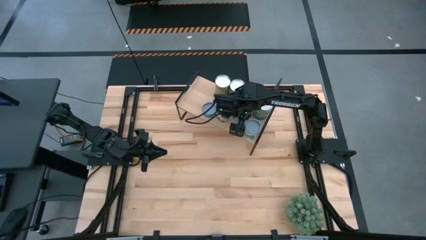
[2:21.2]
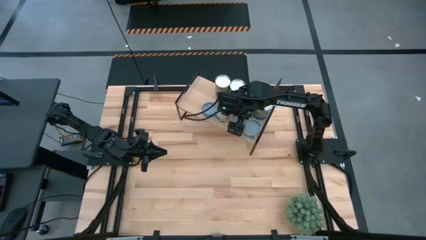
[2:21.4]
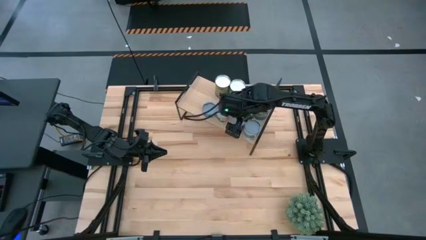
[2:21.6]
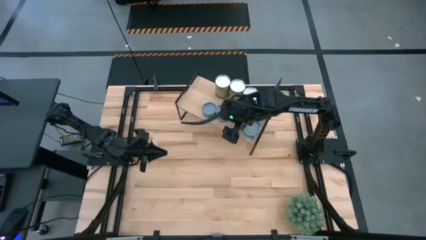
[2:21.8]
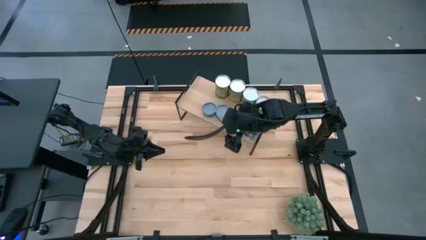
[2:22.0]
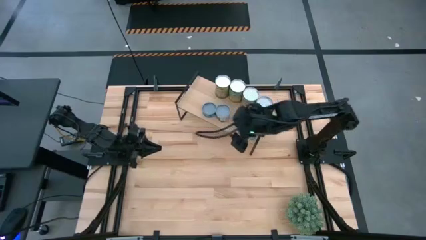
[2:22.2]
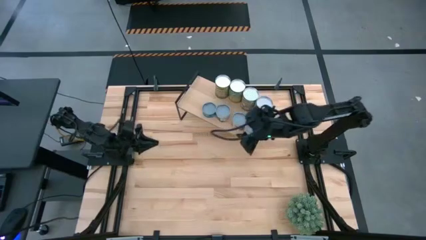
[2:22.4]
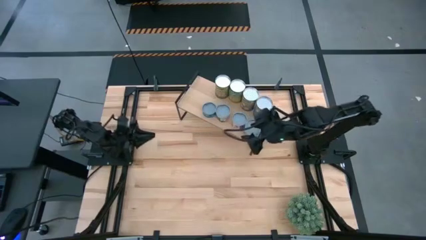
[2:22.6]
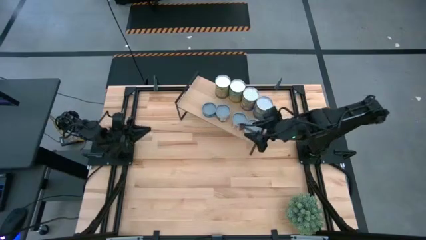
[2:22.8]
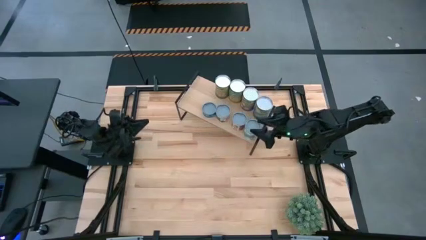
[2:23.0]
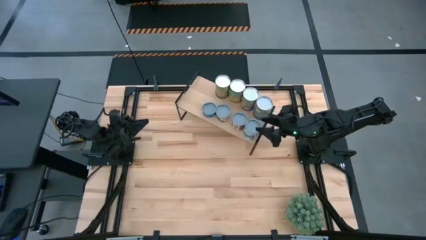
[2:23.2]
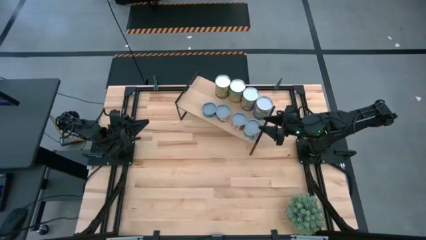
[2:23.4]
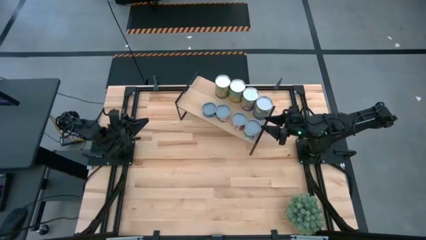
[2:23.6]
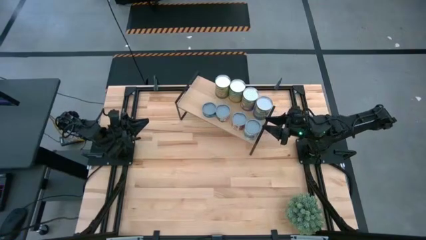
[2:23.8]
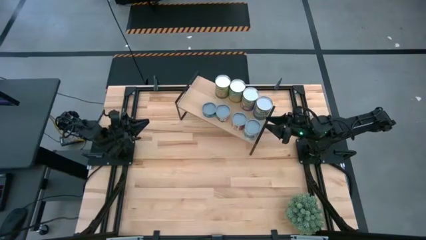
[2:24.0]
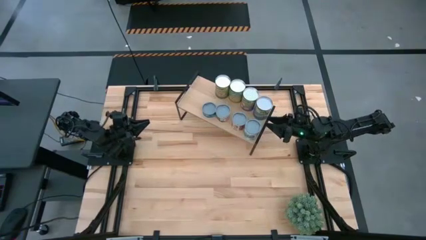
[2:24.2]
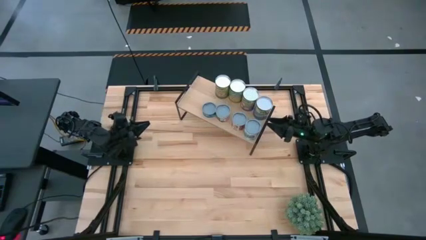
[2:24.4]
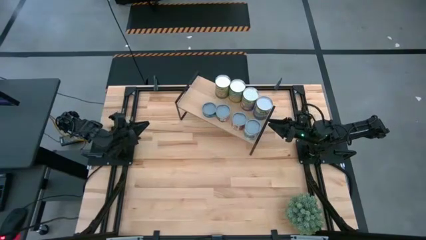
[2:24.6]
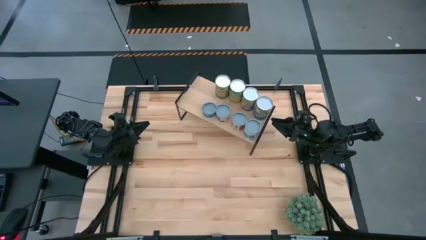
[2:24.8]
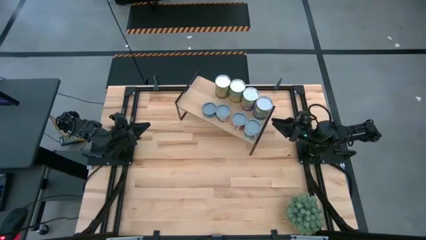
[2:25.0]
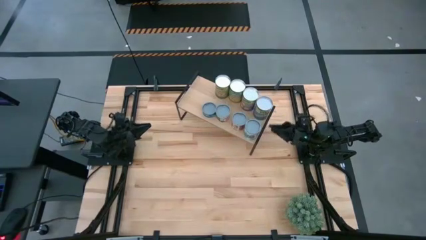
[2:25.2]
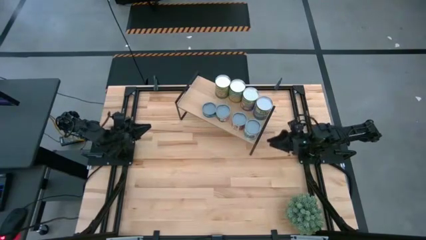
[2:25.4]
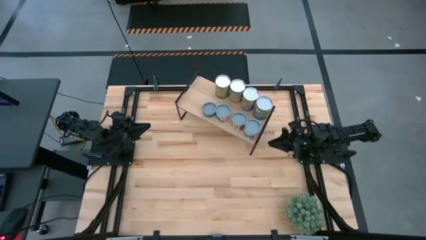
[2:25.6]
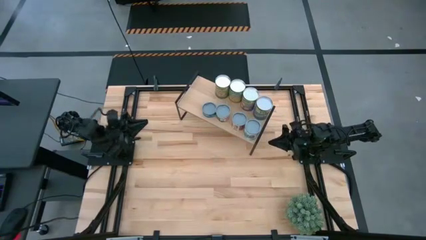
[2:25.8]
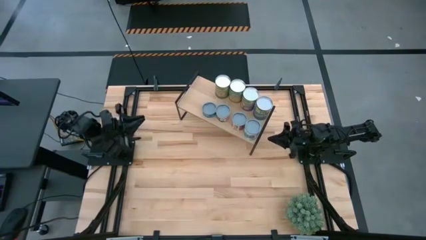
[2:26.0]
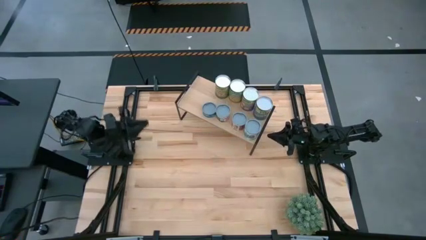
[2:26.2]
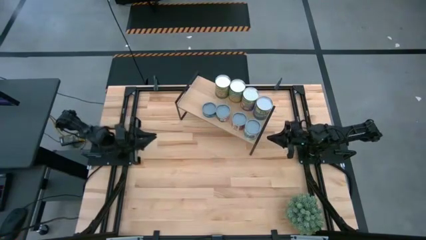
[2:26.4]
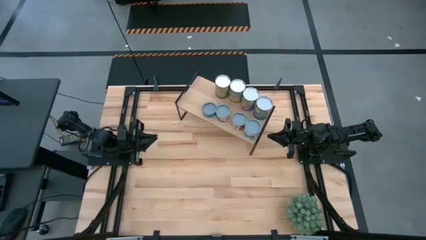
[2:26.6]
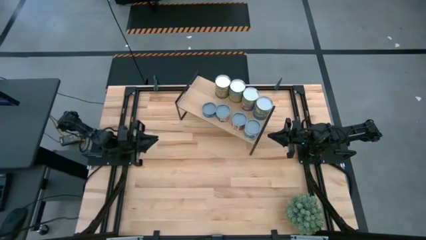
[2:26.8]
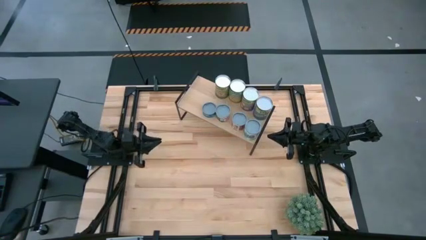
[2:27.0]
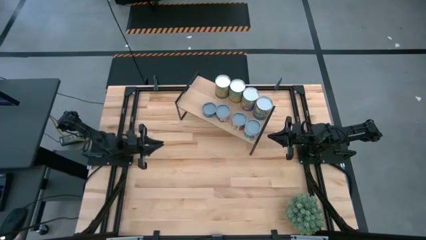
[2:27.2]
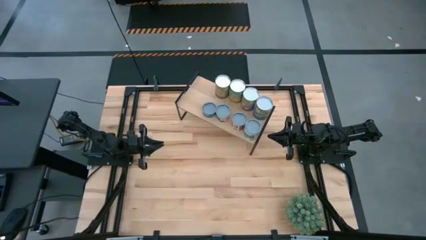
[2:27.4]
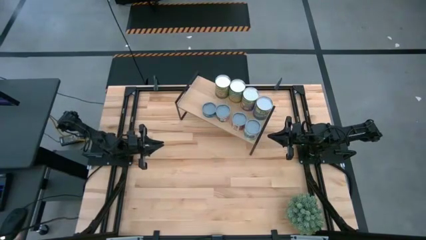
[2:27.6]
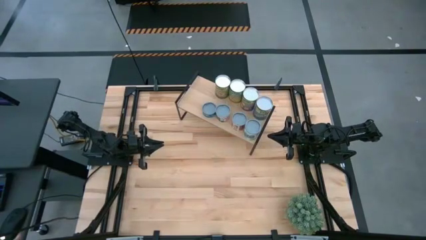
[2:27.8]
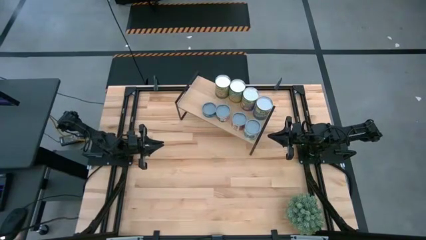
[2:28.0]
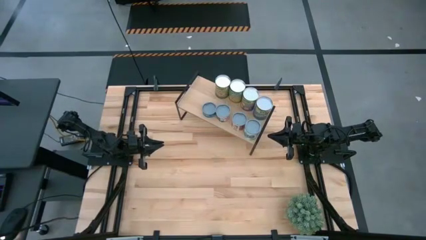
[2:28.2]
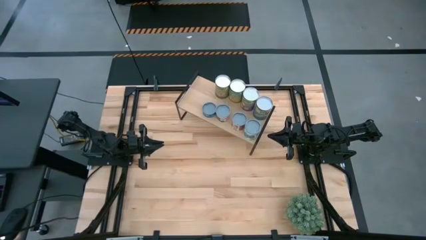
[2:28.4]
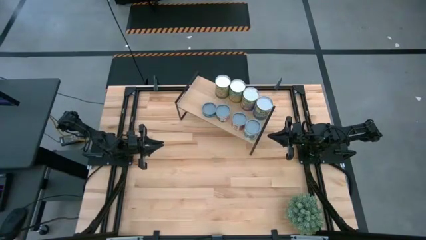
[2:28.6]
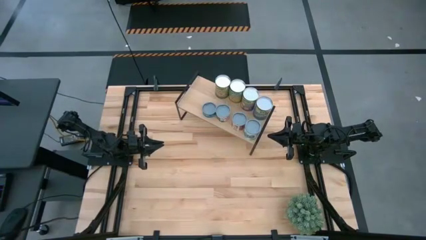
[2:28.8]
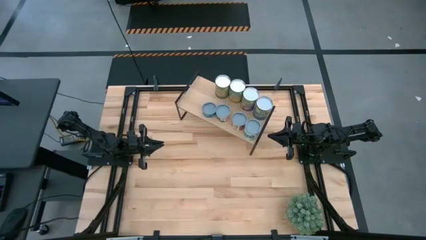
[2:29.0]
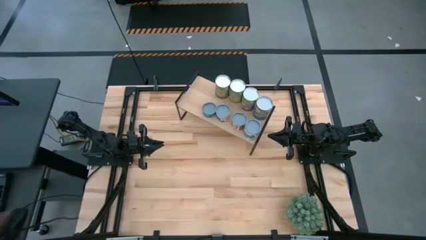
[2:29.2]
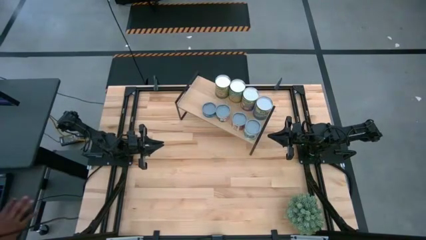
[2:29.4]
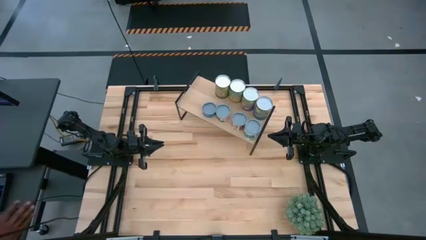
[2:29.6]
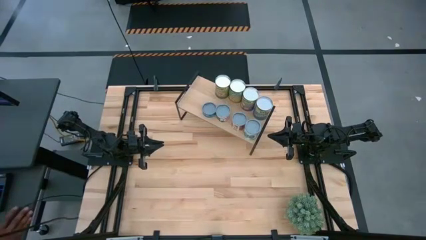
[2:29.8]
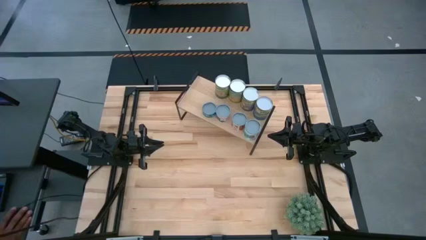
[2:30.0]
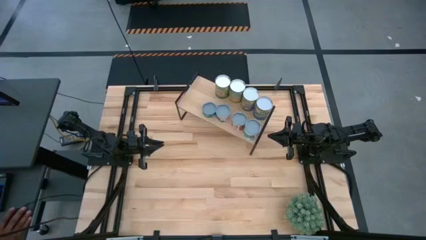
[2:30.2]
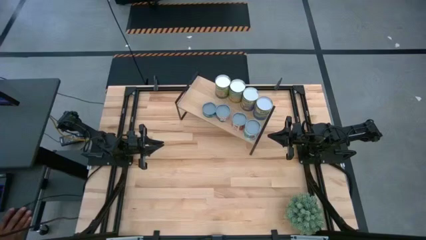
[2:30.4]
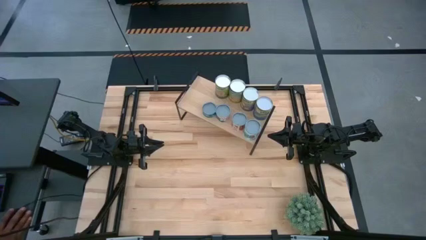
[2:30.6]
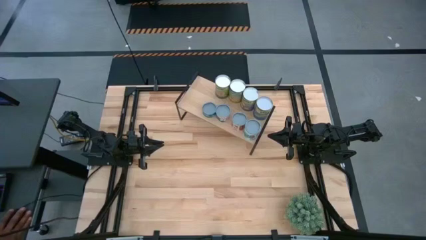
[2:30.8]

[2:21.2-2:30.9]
Task: Pick and place cans onto a shelf
Return to Home Position

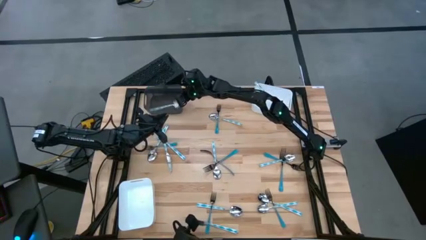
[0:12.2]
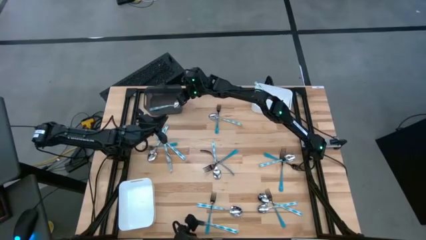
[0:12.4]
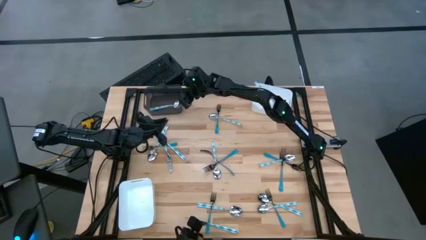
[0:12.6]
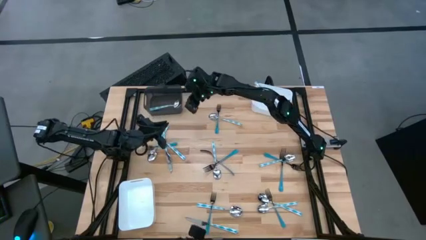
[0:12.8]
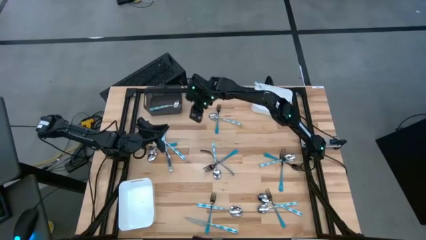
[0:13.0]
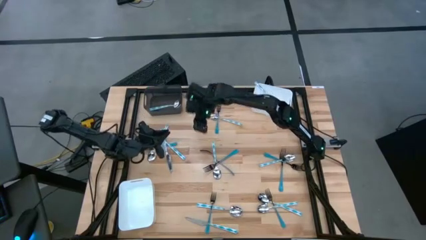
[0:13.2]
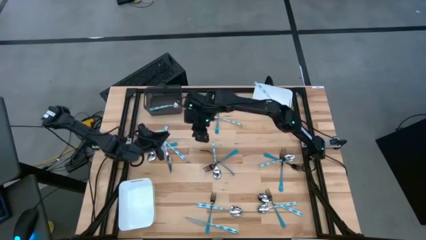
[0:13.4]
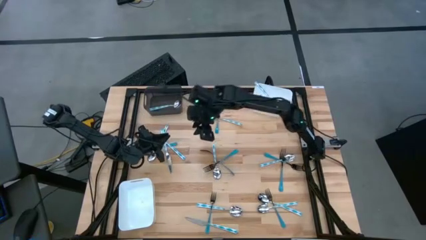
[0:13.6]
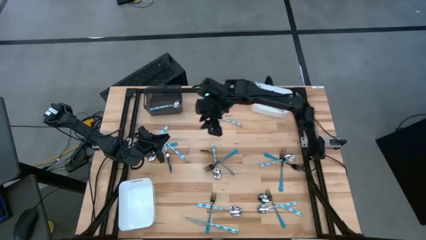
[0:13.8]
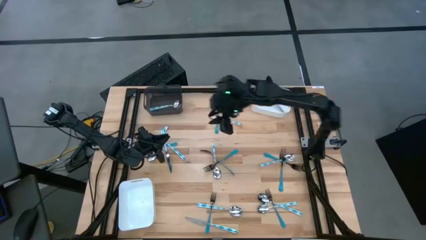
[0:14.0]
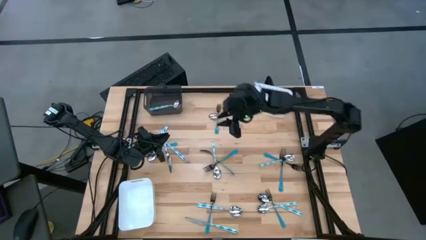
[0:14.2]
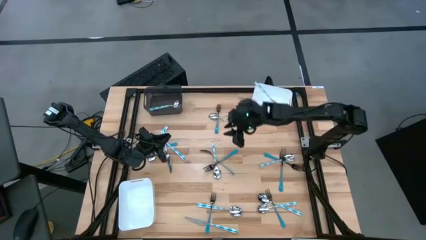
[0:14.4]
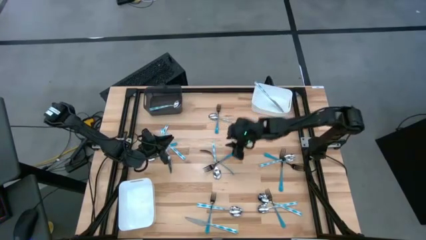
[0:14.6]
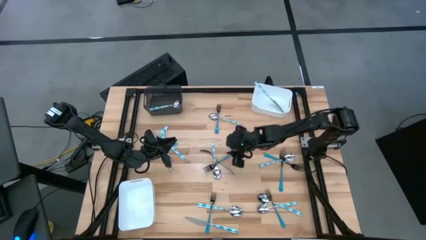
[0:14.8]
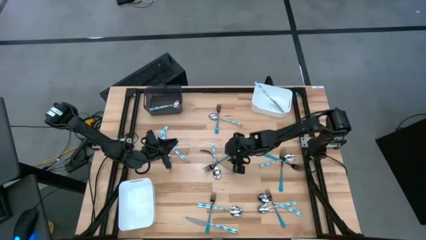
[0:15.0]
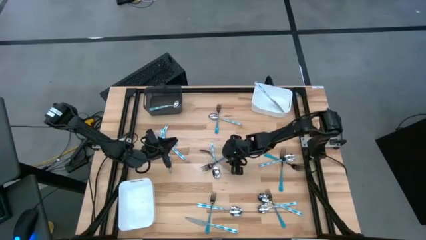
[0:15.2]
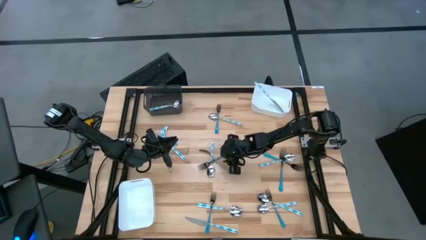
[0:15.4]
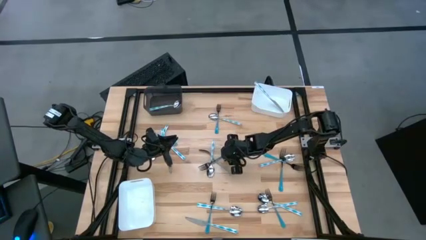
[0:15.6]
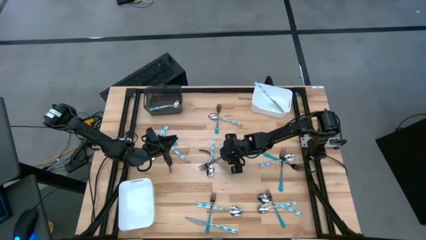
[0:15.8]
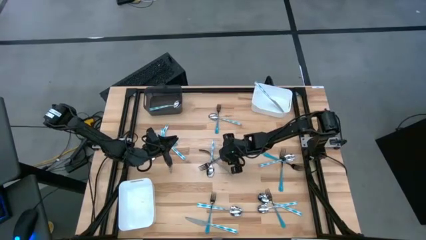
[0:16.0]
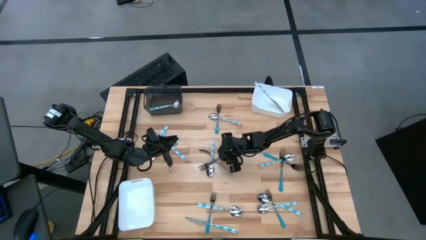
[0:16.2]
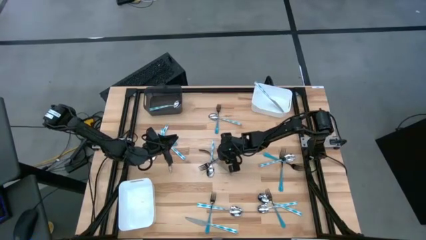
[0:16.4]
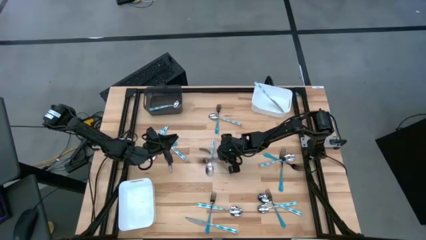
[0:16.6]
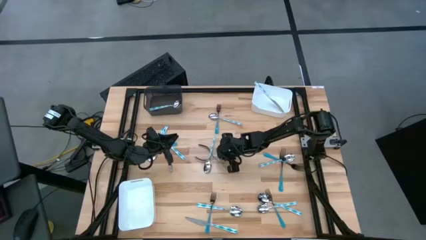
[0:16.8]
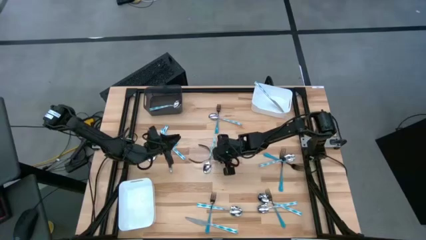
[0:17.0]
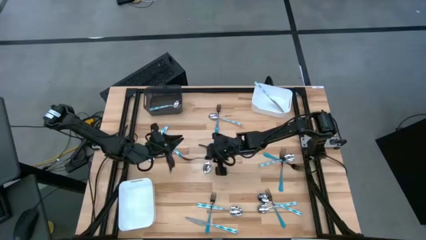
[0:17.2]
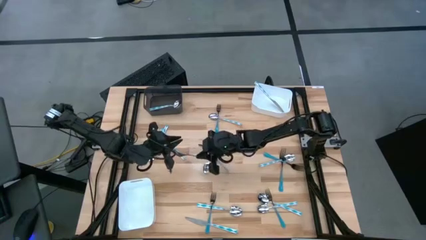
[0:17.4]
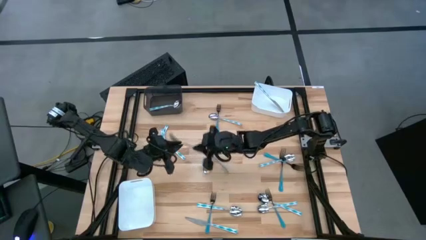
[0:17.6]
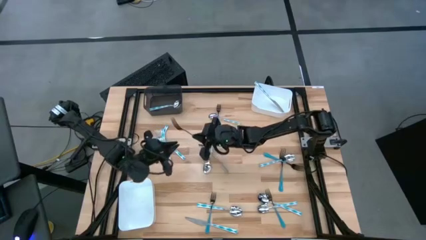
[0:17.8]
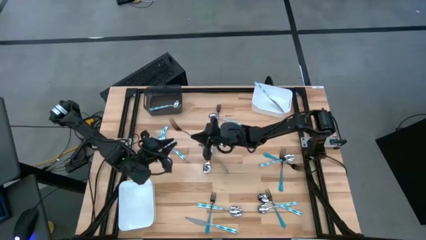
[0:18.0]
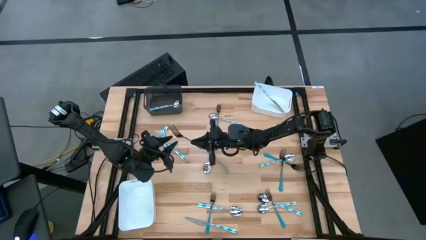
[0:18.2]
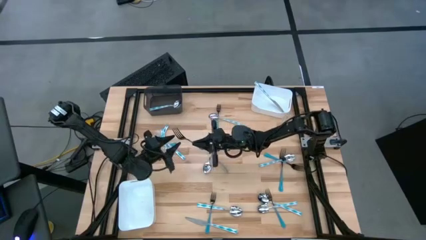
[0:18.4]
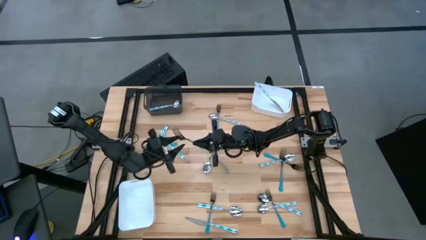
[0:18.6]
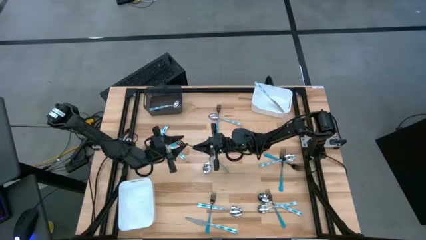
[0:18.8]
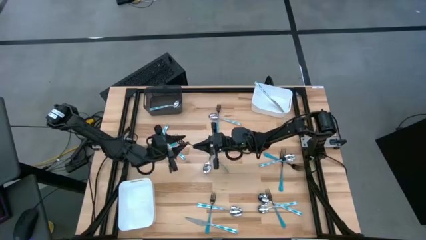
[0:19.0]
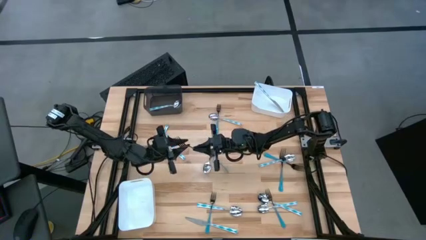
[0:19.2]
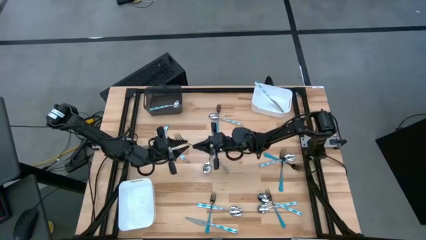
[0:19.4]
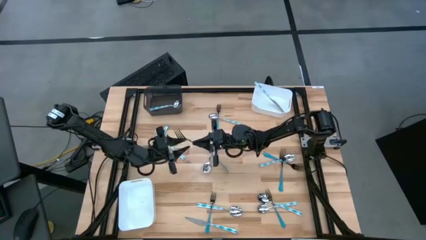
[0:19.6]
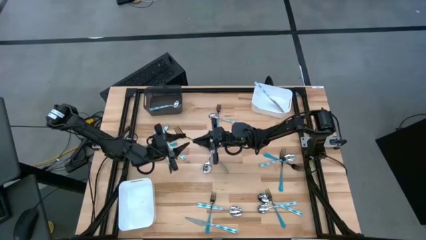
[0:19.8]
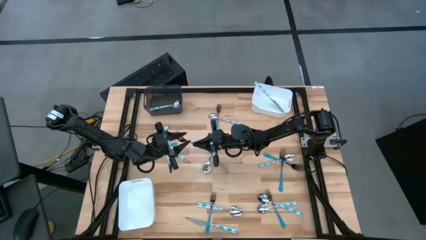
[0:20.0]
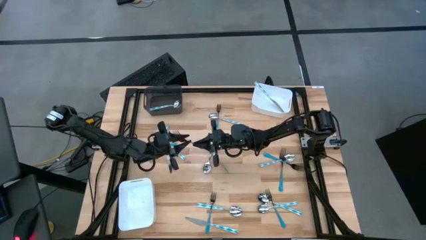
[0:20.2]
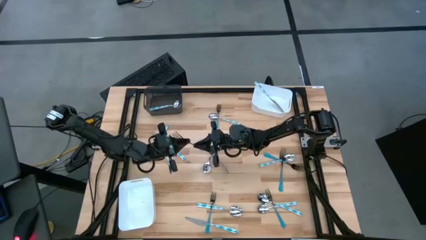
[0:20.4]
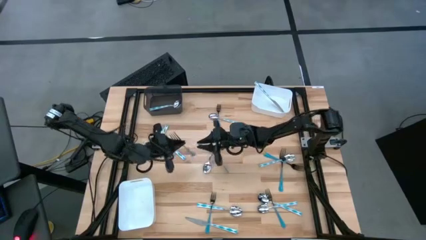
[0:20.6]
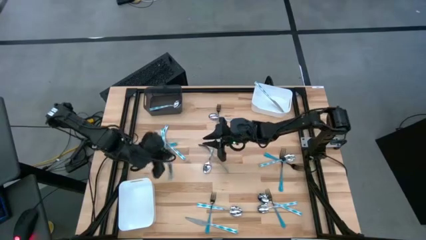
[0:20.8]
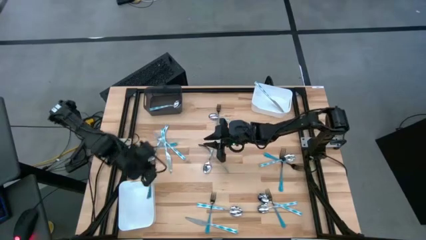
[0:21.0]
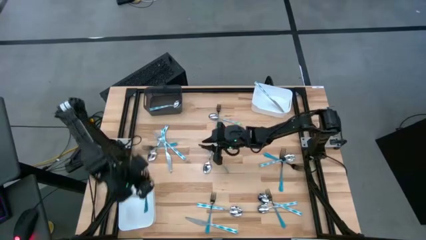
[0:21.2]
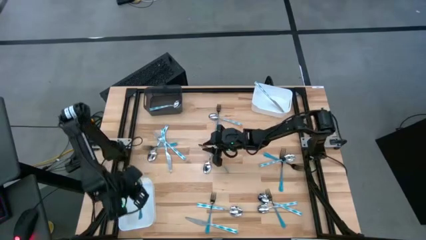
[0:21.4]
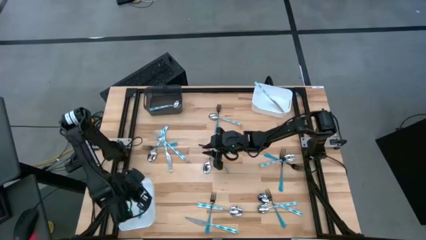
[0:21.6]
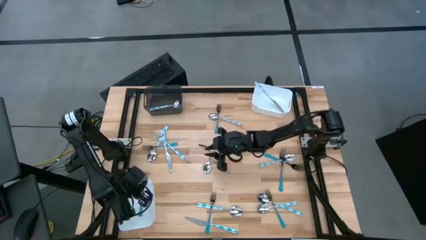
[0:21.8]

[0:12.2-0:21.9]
Task: Sort silverware by color (type)
Put the blue fork into the bottom white bin
